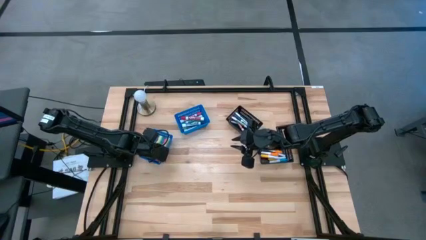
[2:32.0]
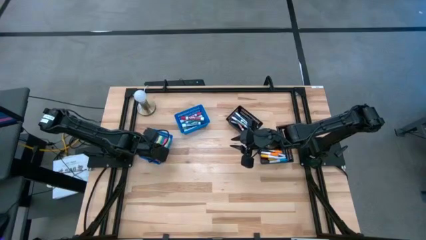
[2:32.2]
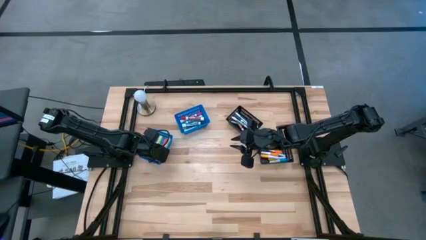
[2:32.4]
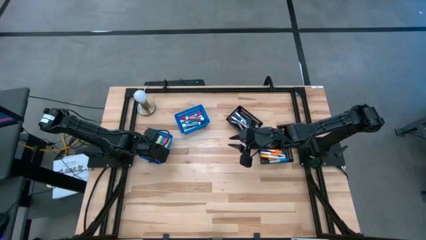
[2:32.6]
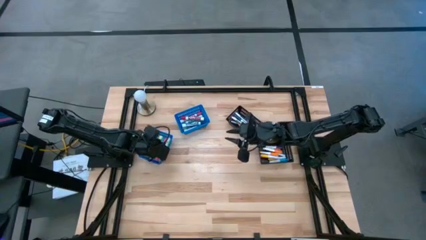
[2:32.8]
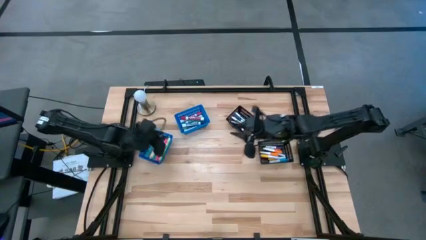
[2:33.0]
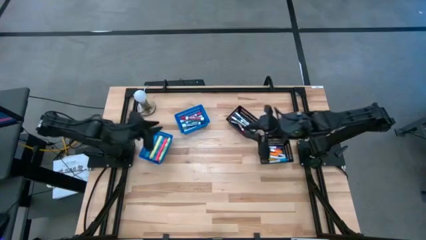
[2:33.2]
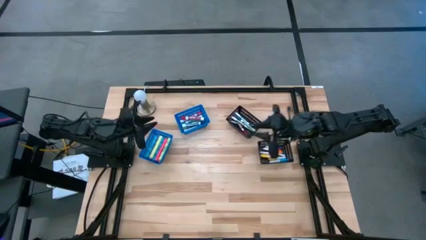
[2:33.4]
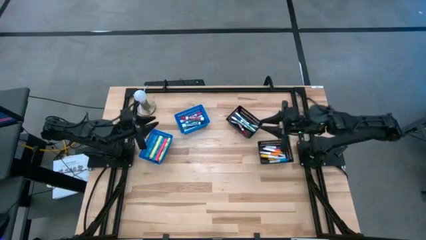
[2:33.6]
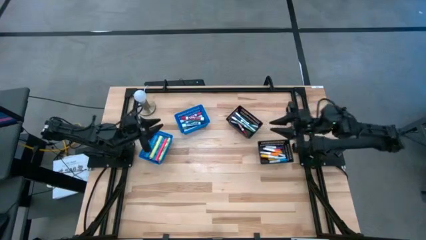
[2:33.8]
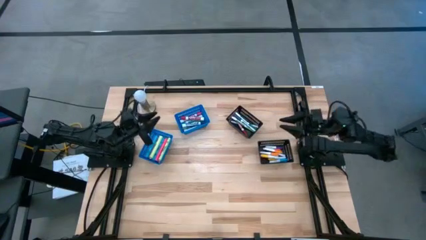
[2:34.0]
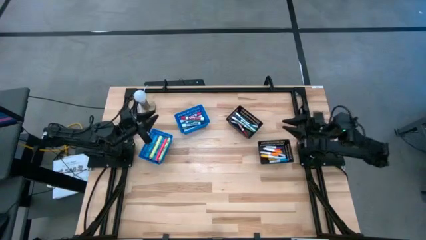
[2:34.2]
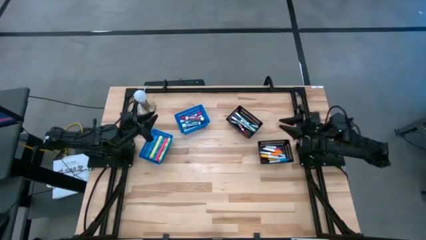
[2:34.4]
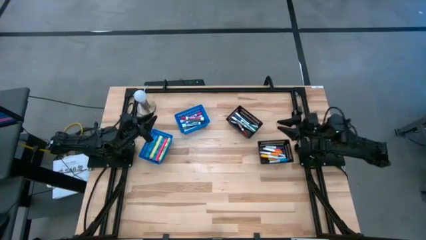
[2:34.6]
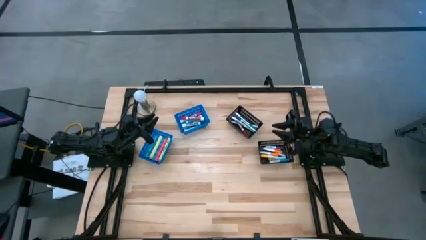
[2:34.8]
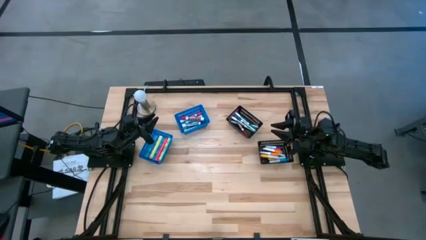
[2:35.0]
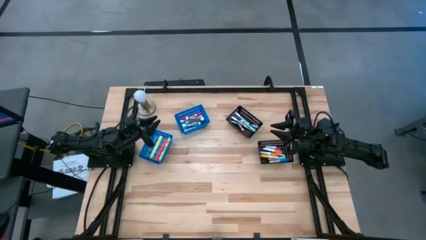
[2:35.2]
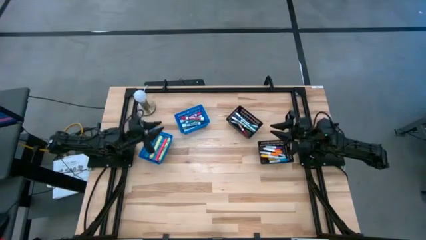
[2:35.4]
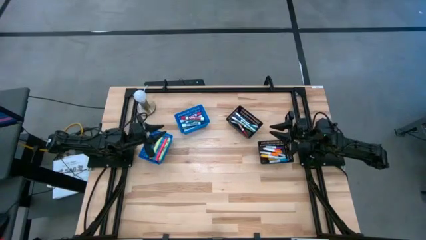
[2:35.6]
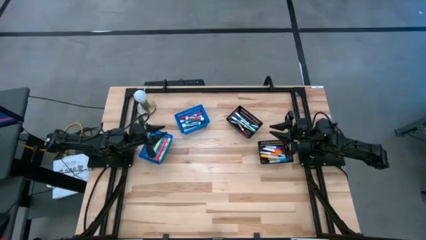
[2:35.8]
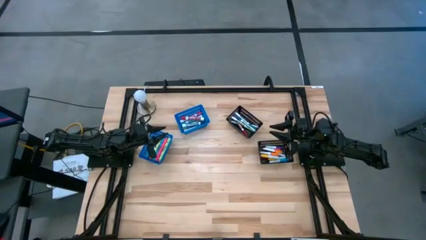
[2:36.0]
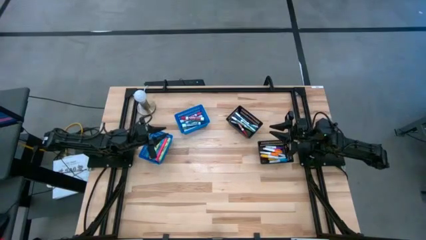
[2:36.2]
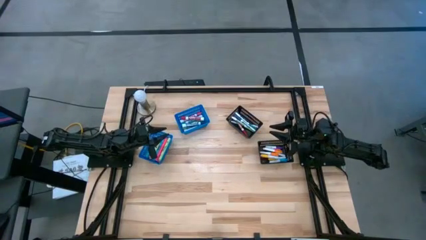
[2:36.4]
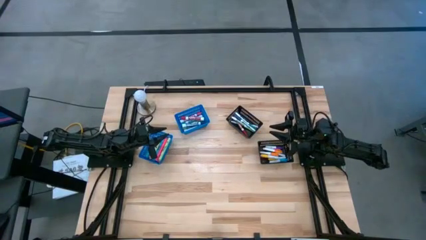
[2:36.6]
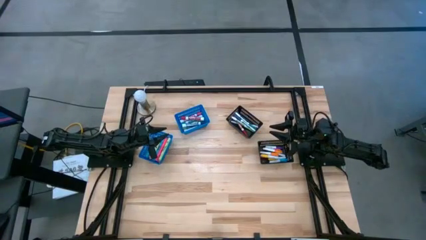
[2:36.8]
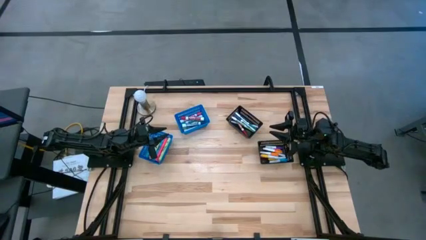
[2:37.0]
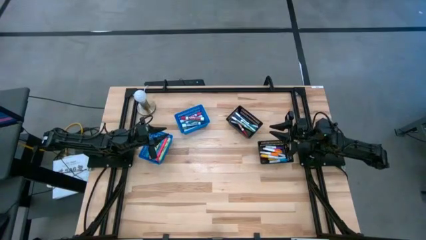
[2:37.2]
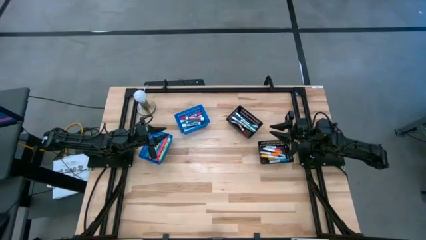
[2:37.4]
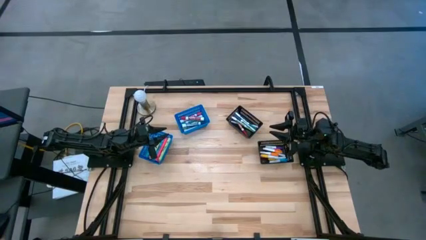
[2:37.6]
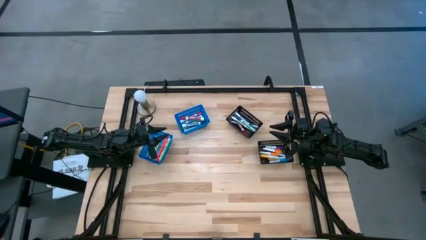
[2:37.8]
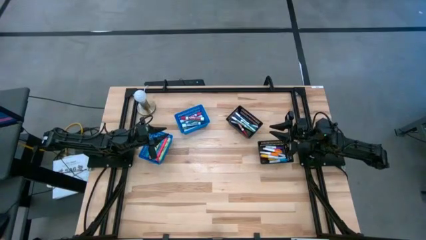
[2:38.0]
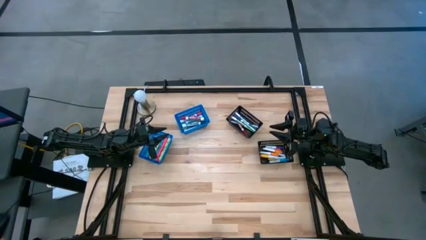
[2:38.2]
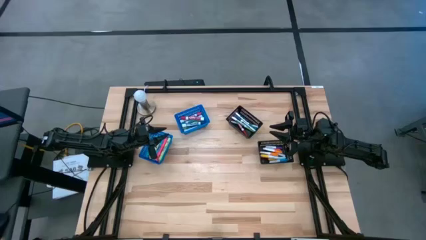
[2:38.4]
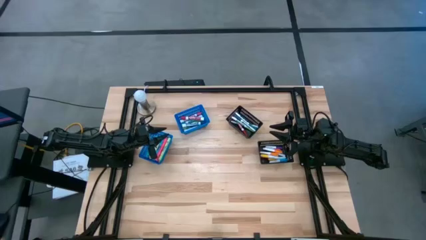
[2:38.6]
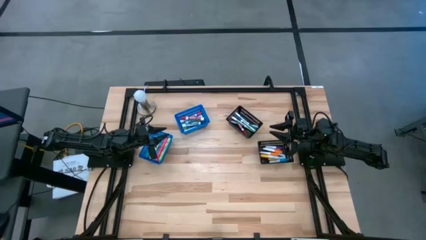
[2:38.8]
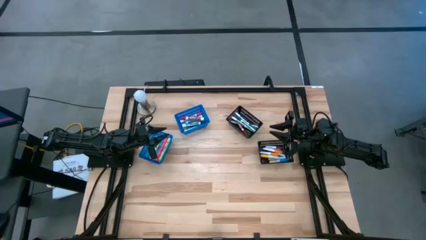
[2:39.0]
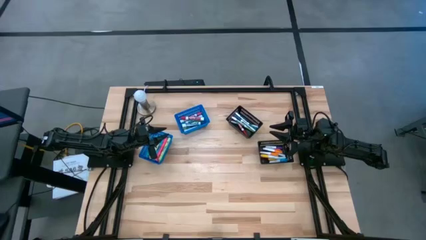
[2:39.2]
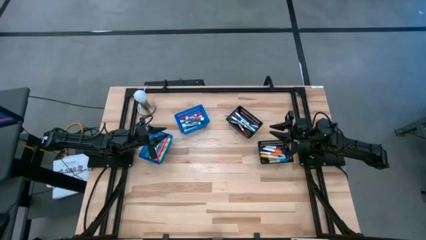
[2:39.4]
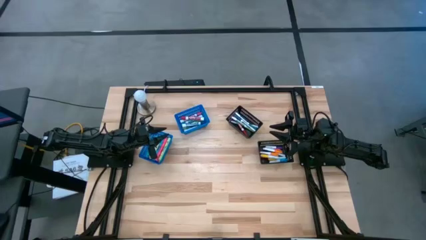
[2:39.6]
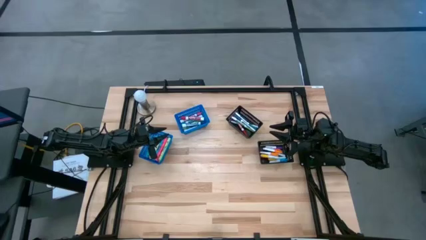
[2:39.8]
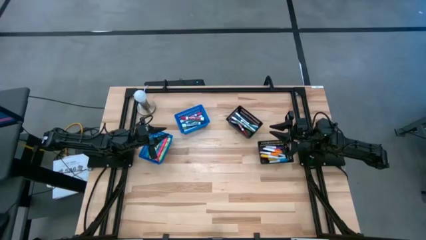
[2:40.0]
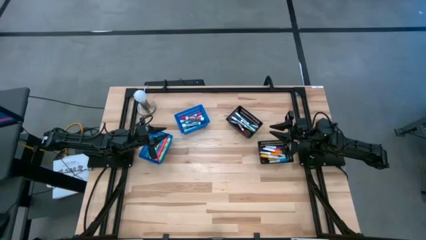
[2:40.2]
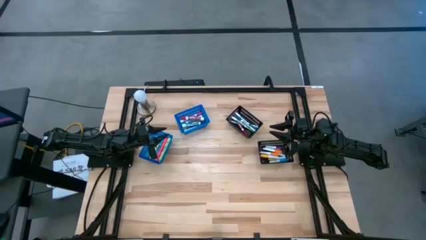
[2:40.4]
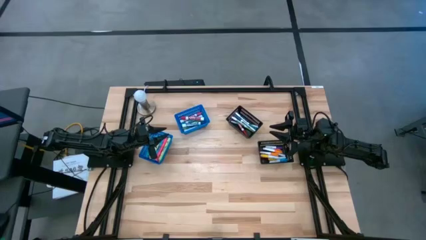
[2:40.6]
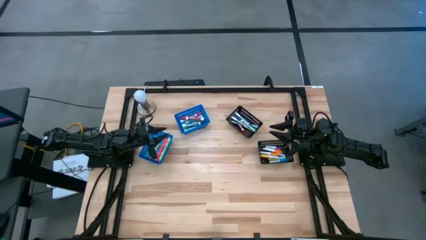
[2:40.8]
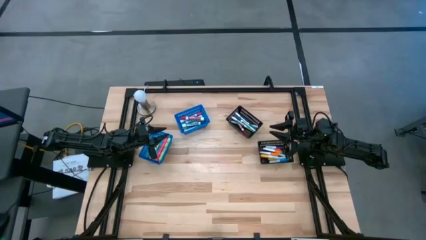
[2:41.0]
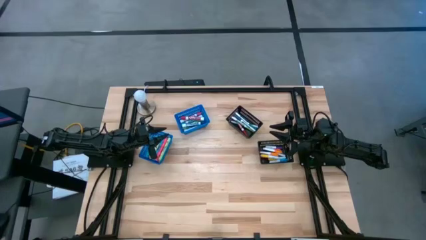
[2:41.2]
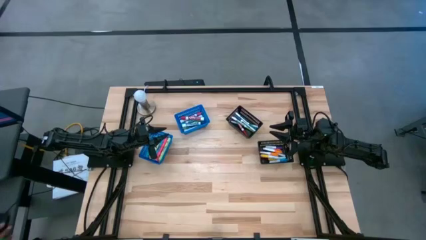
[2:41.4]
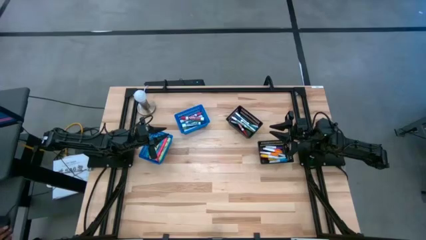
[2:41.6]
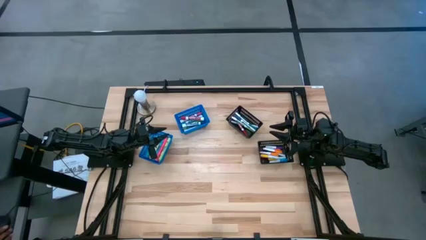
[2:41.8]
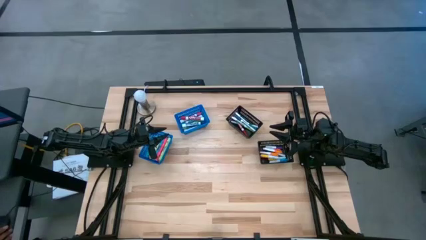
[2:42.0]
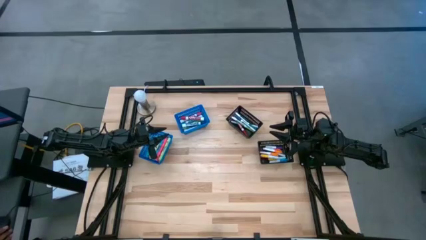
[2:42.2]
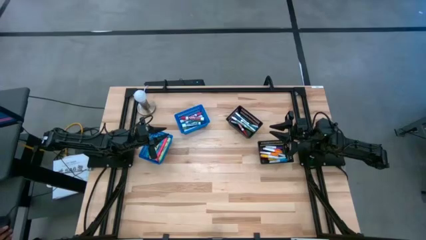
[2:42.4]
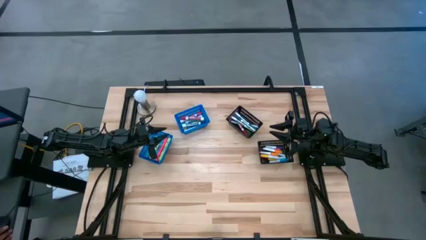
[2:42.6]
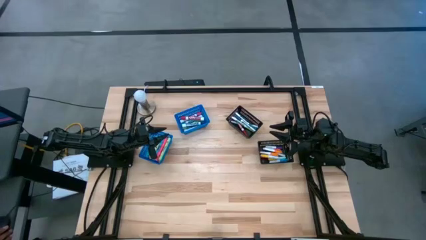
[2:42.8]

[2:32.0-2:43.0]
Task: Pick & Place Markers
Return to Home Position
